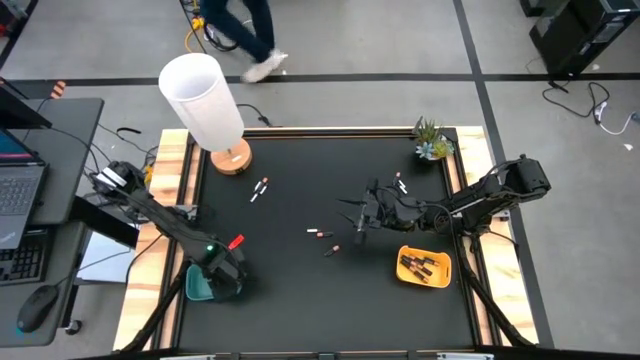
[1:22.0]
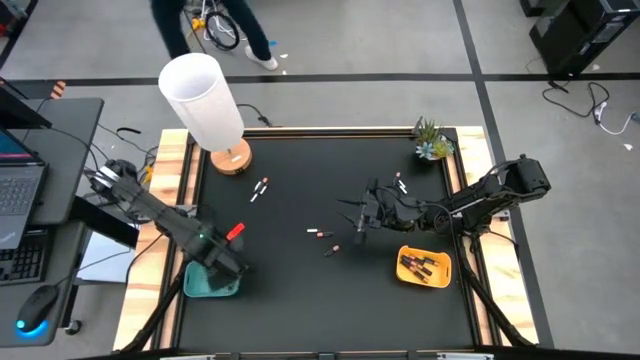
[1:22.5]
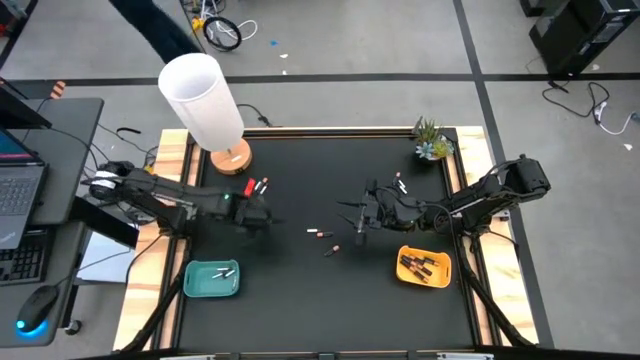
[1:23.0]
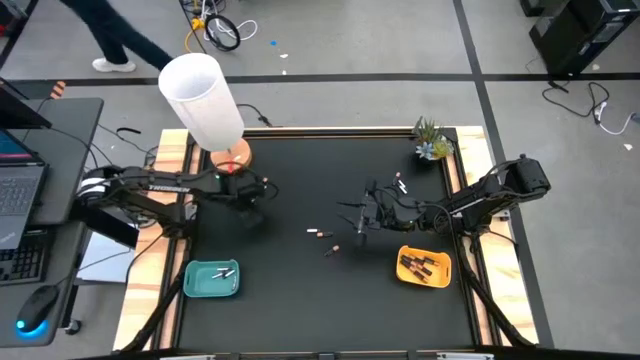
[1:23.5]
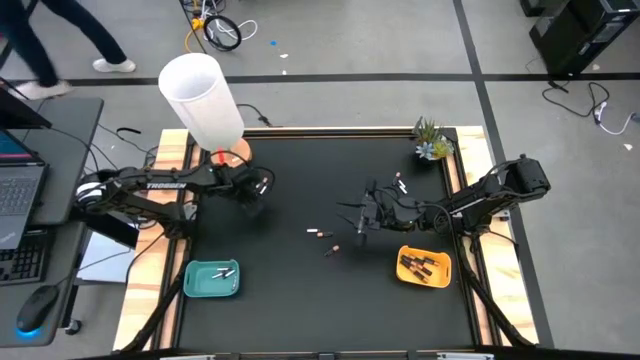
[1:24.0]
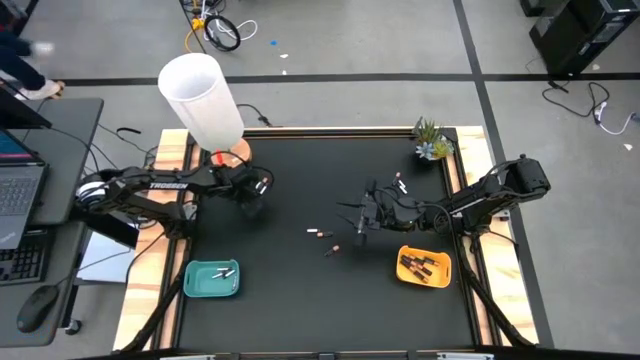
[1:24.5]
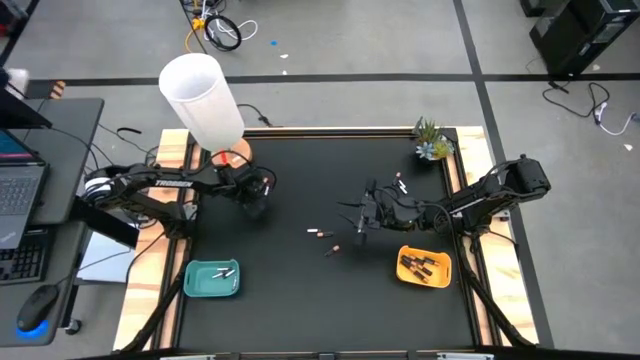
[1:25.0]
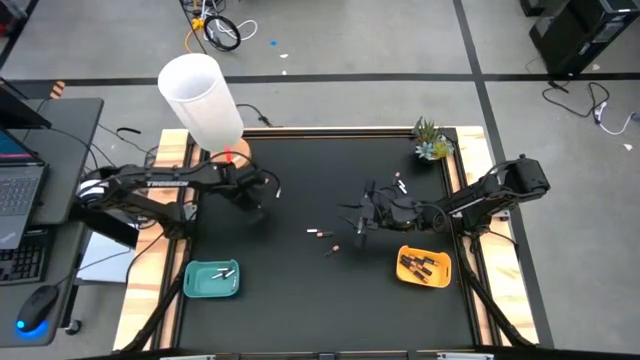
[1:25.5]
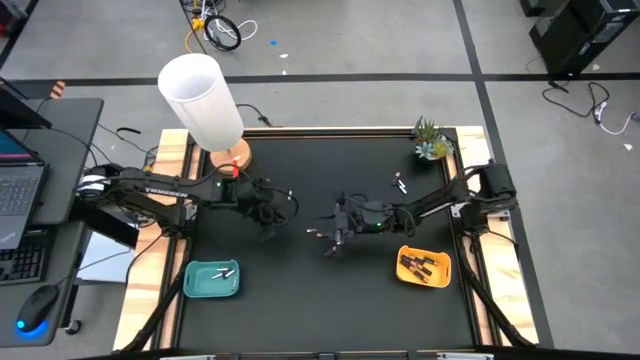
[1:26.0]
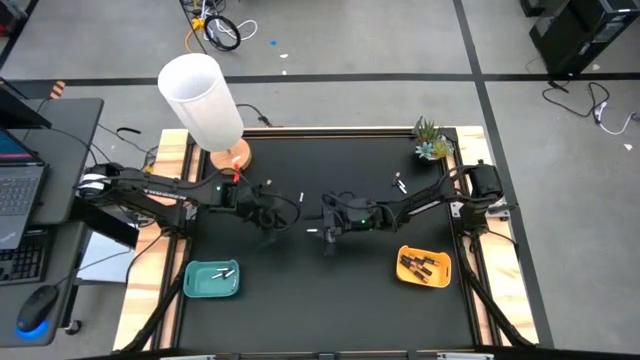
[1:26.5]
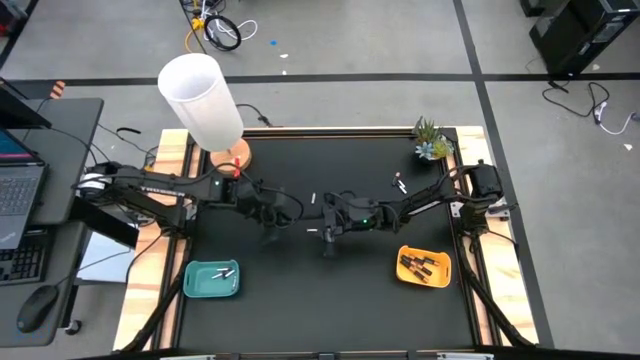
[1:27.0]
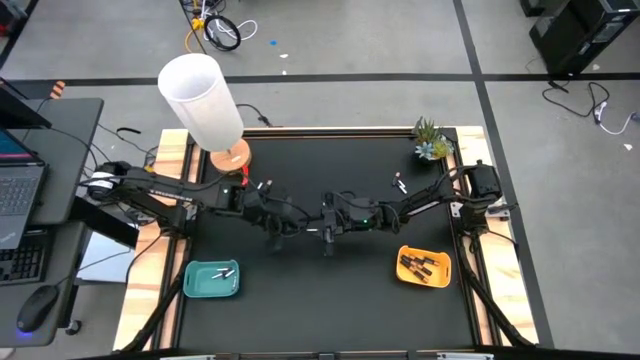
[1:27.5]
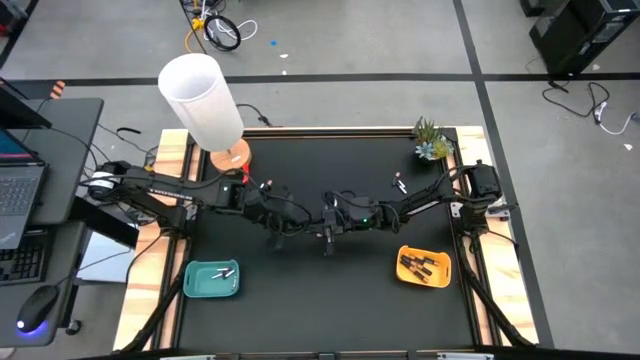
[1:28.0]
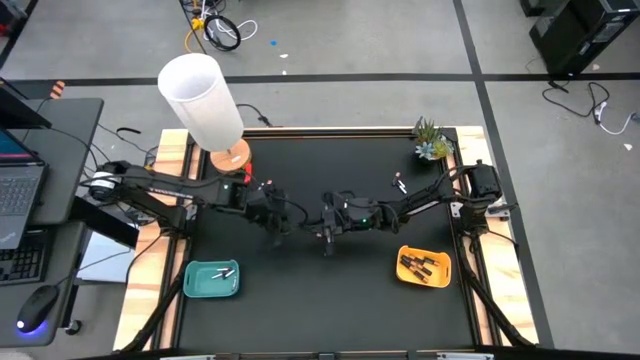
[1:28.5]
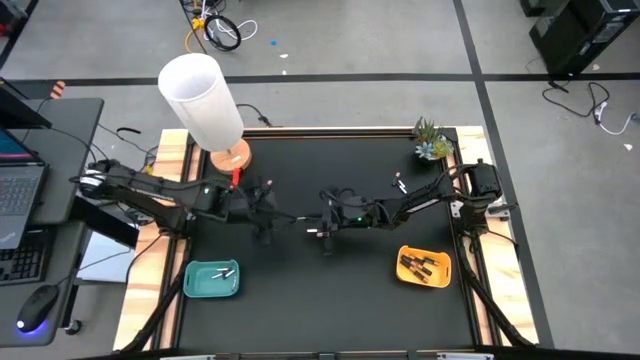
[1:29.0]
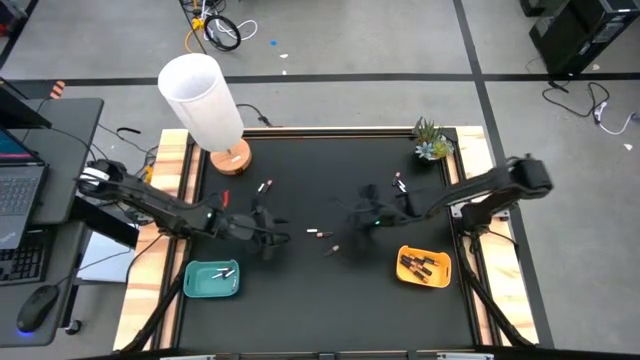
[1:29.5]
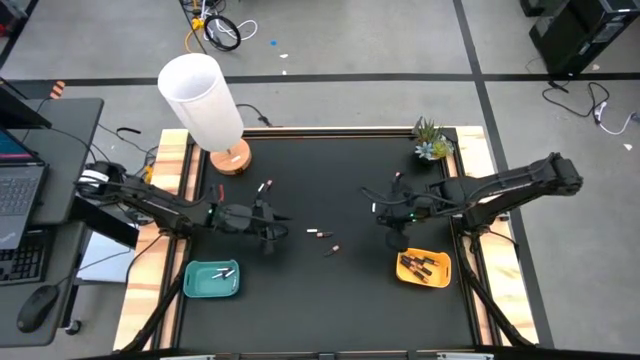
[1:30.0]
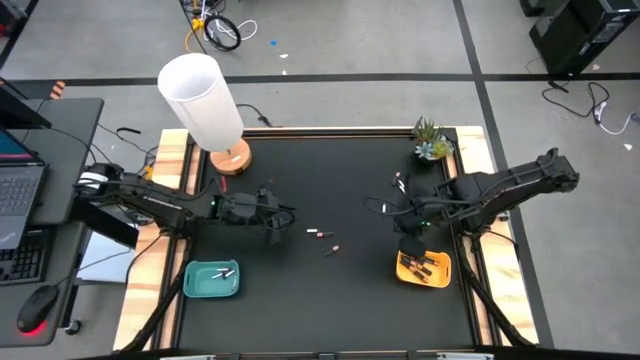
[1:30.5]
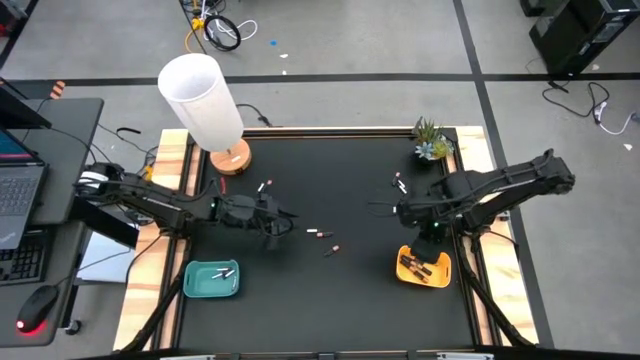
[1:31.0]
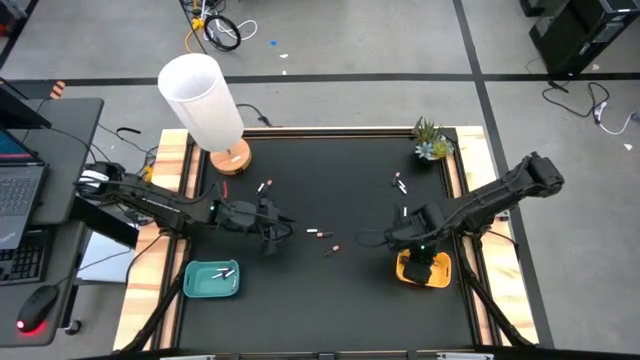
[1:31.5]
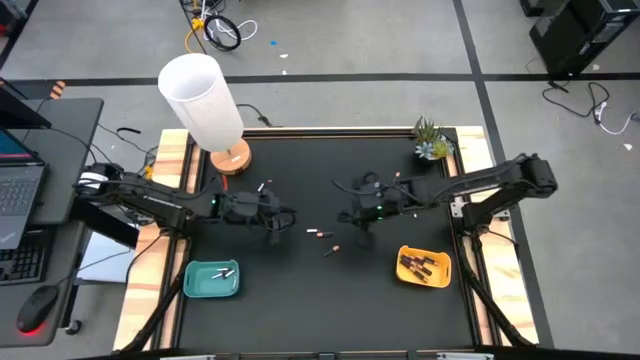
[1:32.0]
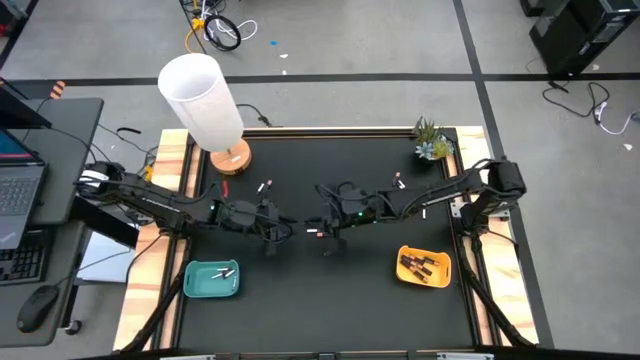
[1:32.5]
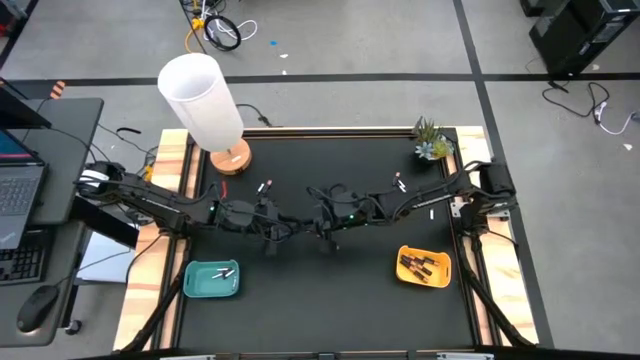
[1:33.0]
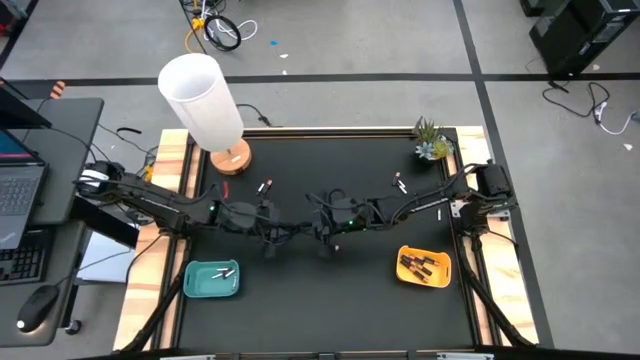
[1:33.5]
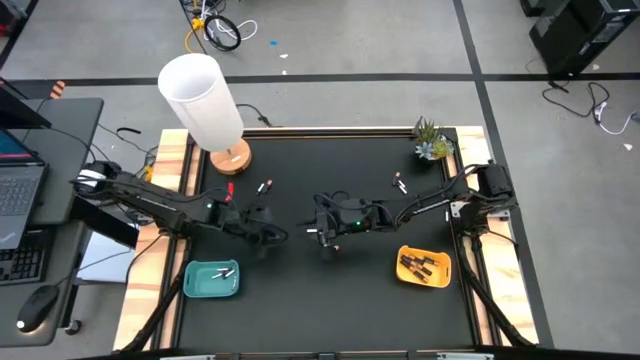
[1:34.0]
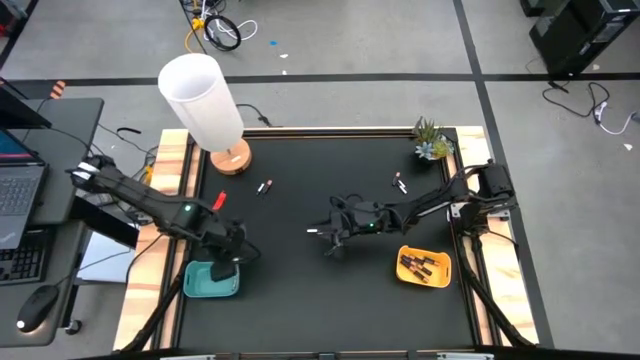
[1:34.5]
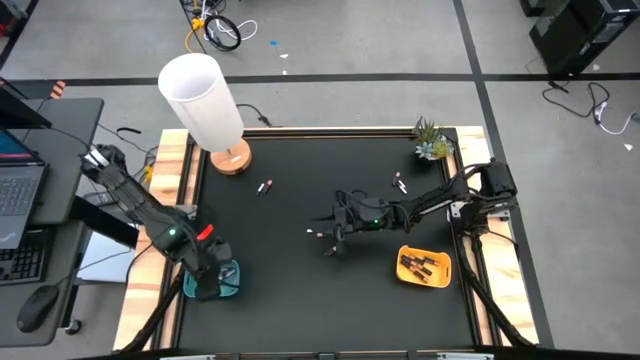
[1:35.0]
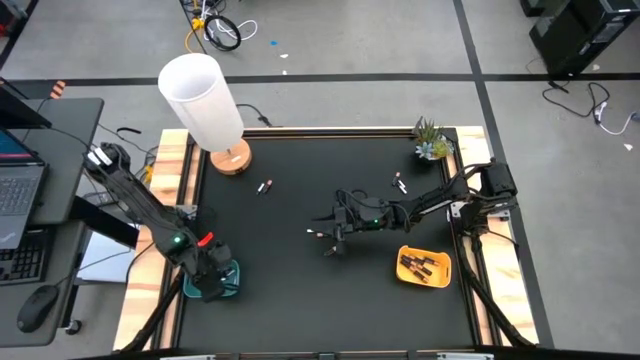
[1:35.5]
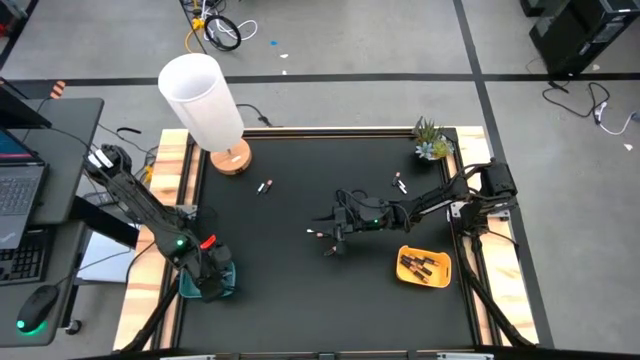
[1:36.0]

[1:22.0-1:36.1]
Task: Sort batteries
Put the silver battery into the green bin

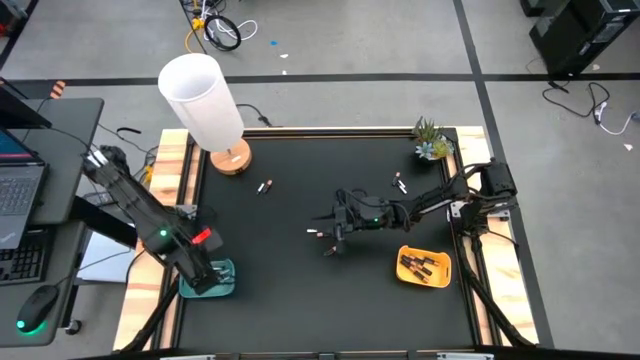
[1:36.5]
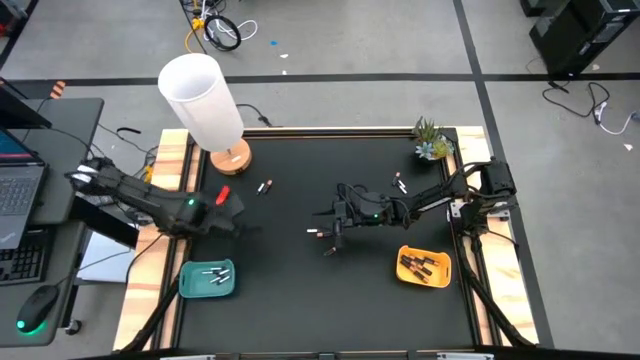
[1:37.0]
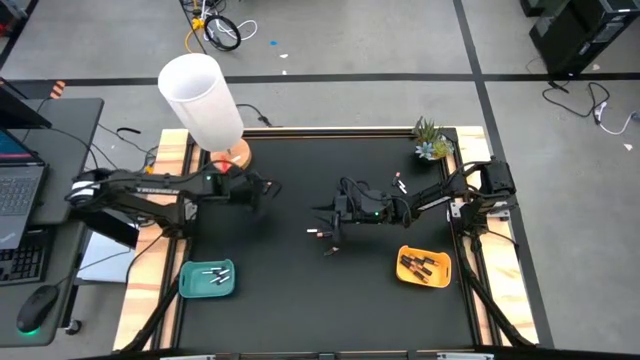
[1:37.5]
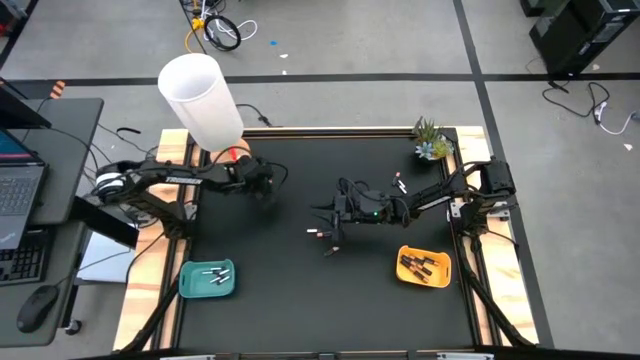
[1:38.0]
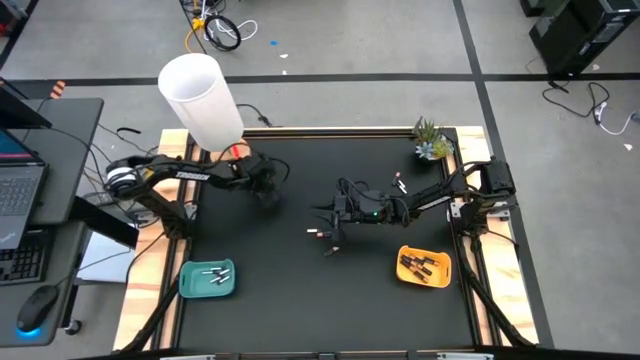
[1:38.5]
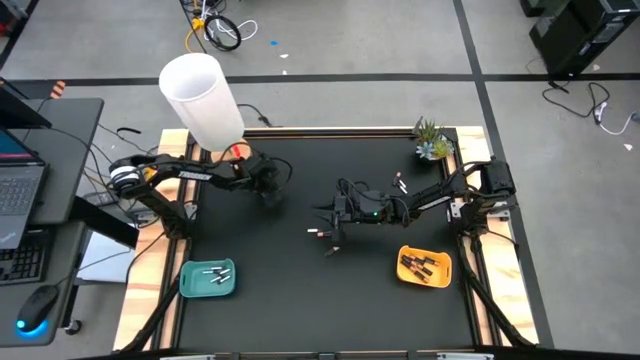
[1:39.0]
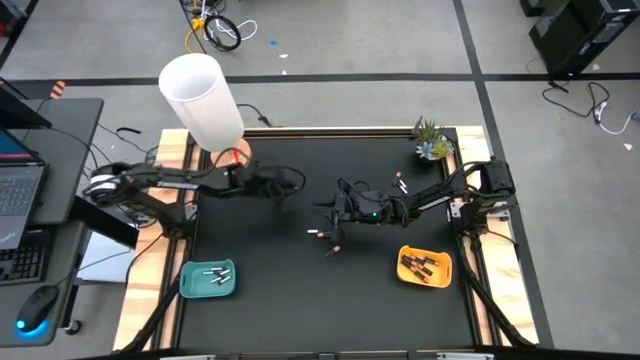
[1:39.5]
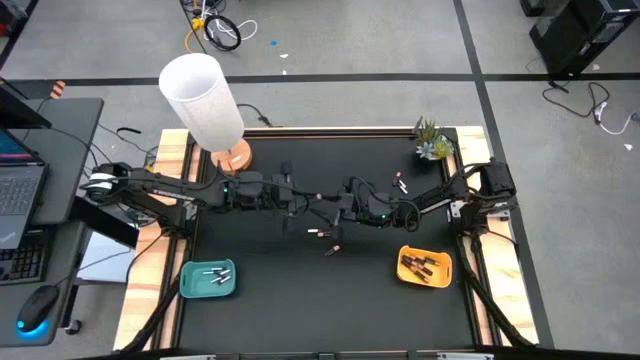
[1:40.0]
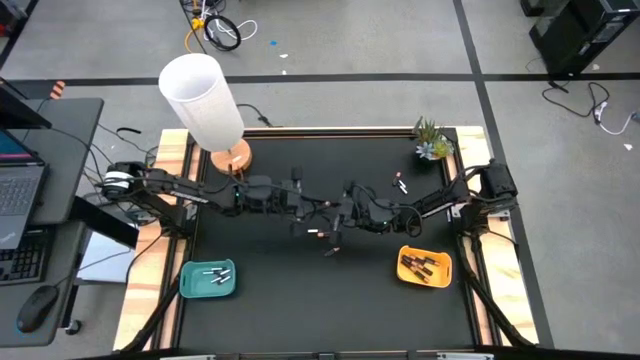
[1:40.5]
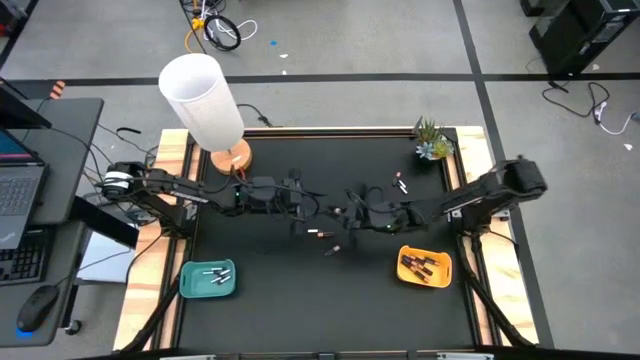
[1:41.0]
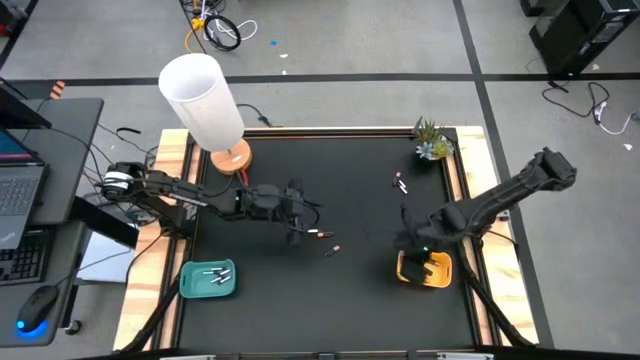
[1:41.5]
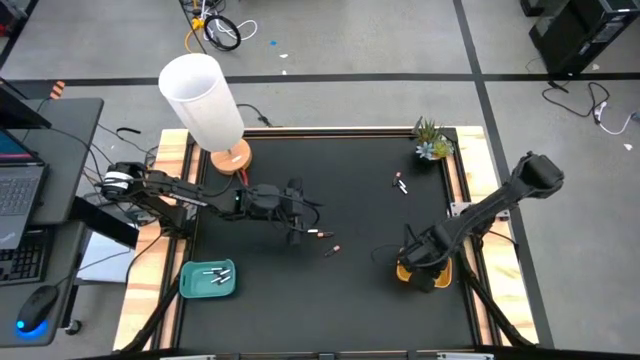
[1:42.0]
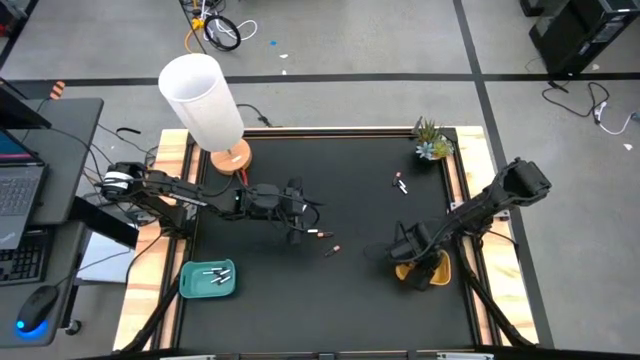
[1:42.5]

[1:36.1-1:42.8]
Put the black battery into the yellow bin
